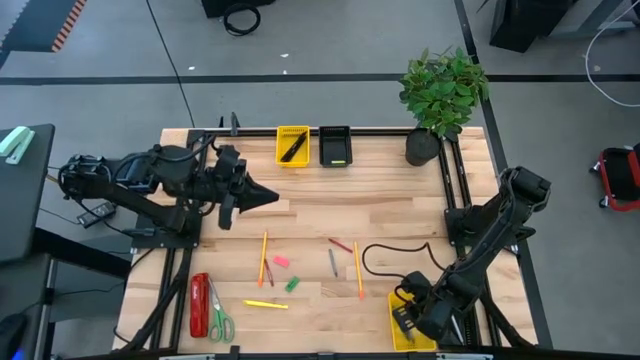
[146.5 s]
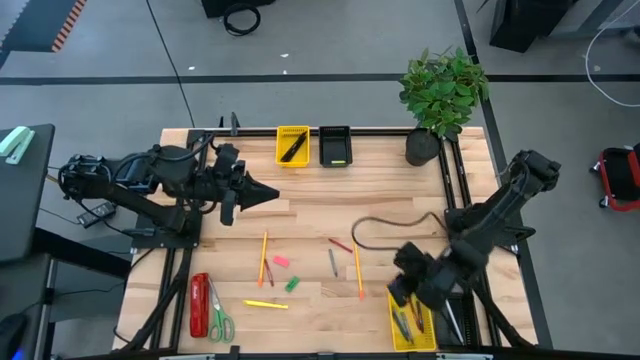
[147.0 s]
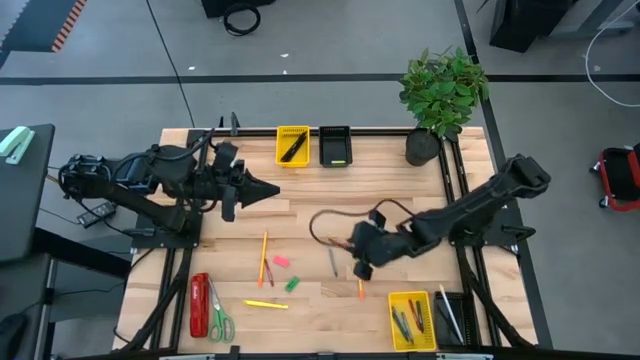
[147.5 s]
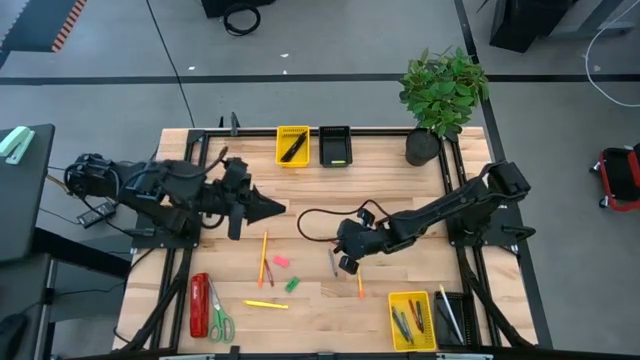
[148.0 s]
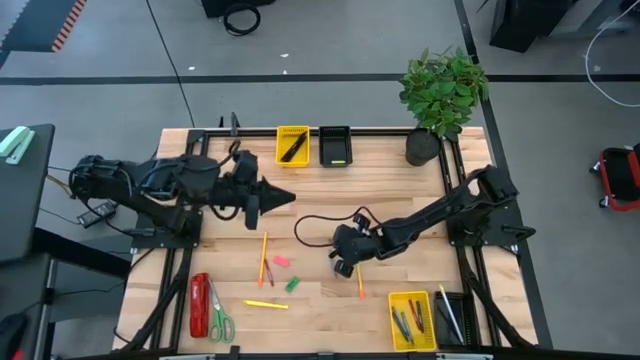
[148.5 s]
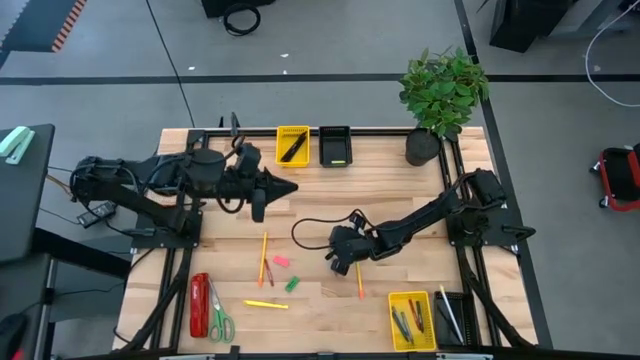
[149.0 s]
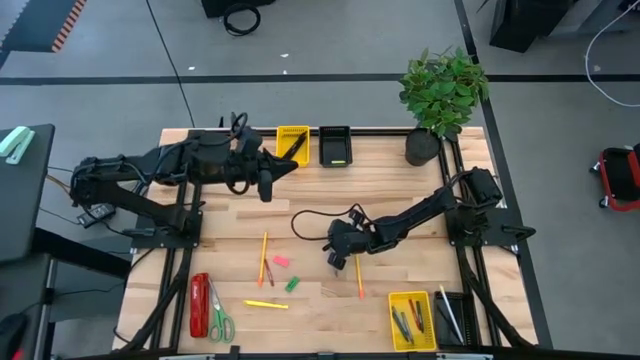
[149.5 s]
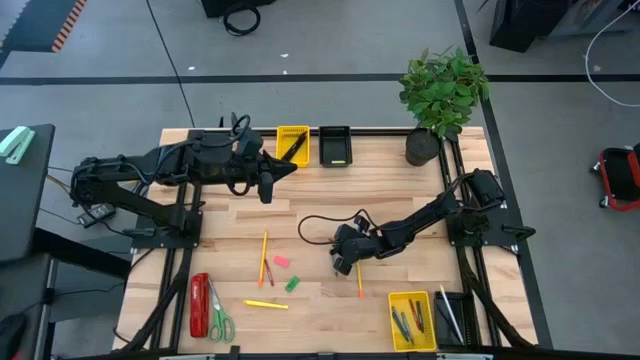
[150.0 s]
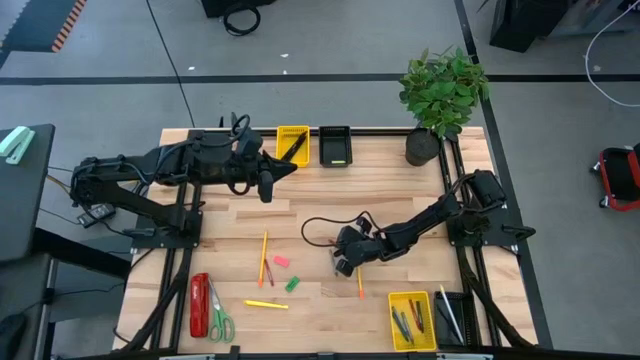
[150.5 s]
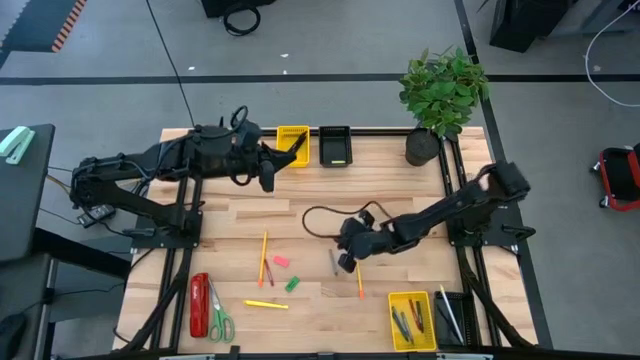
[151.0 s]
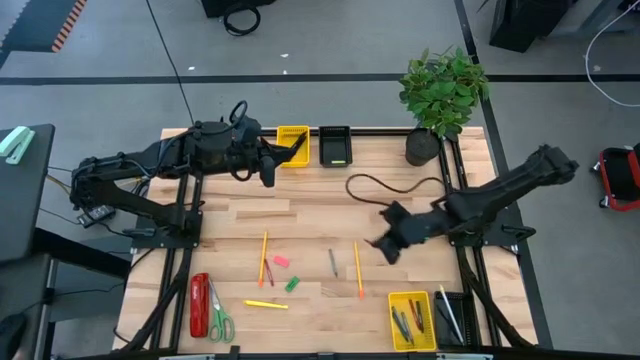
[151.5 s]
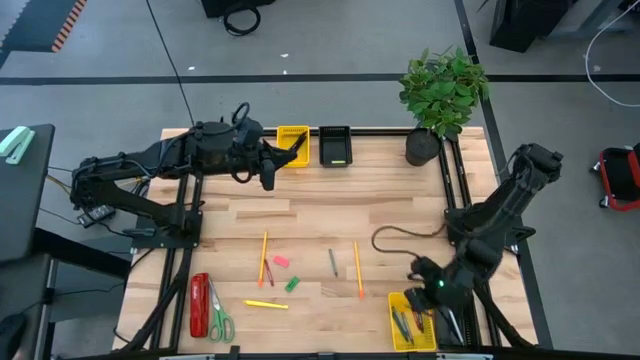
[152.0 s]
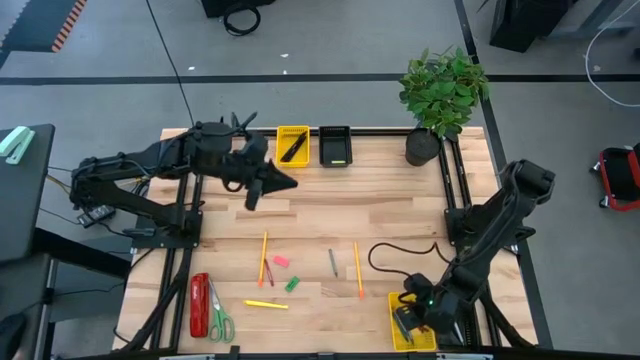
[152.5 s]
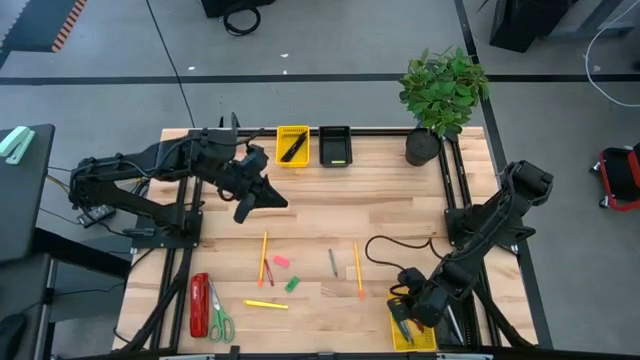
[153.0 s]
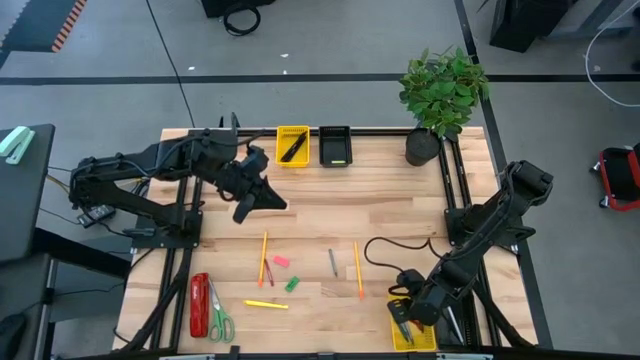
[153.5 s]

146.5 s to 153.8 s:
Task: Sort crayons/erasers/pens/pencils in bins
Put the right red crayon into the bottom yellow bin

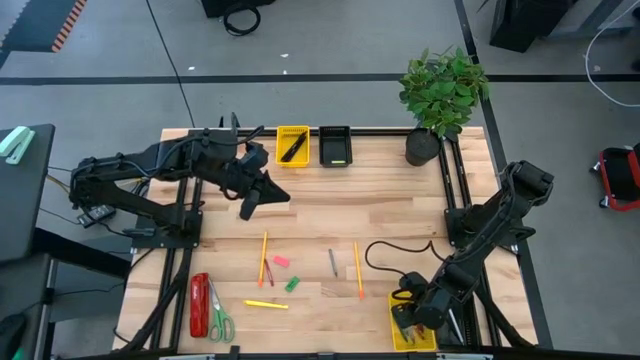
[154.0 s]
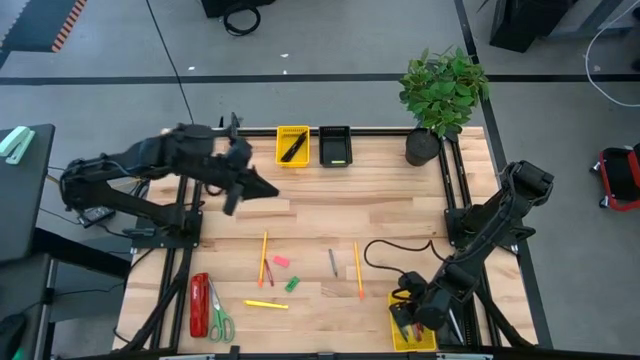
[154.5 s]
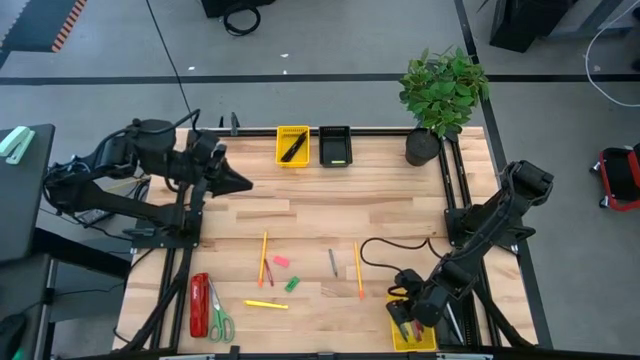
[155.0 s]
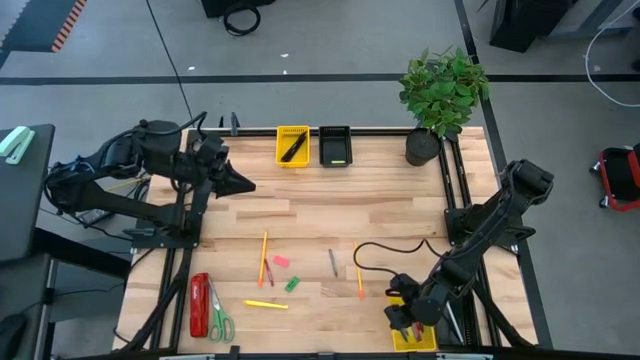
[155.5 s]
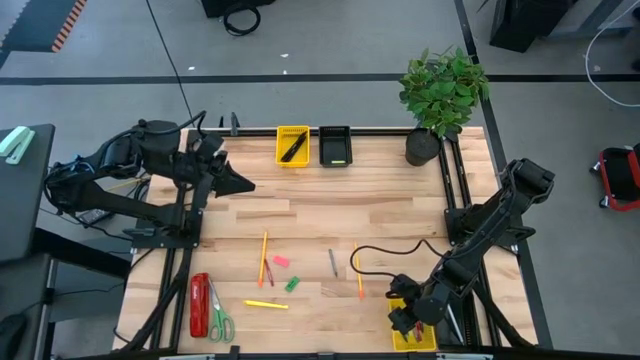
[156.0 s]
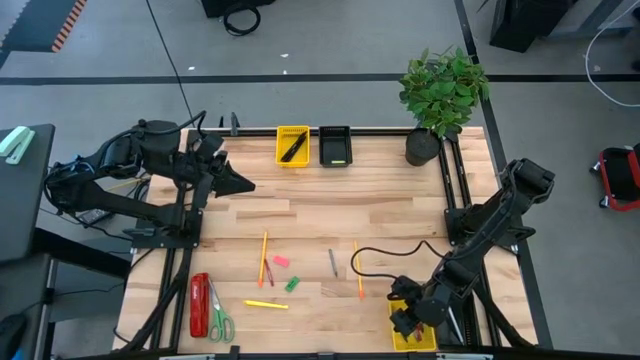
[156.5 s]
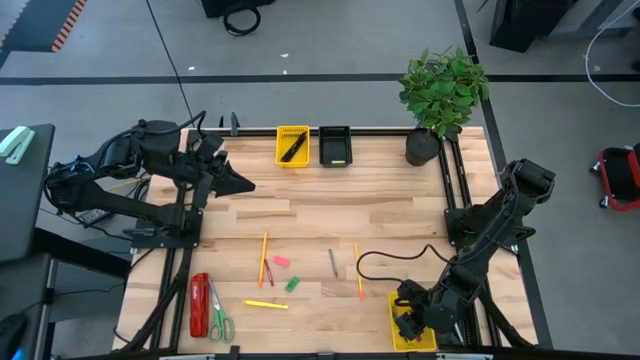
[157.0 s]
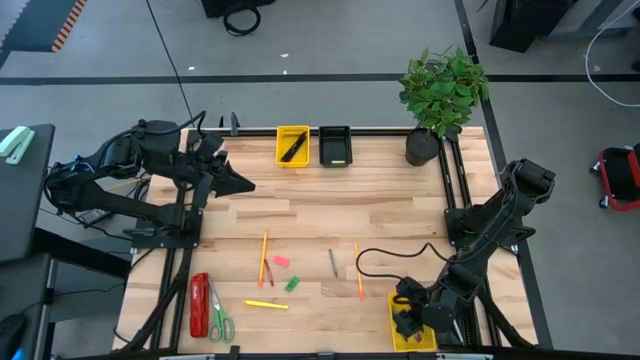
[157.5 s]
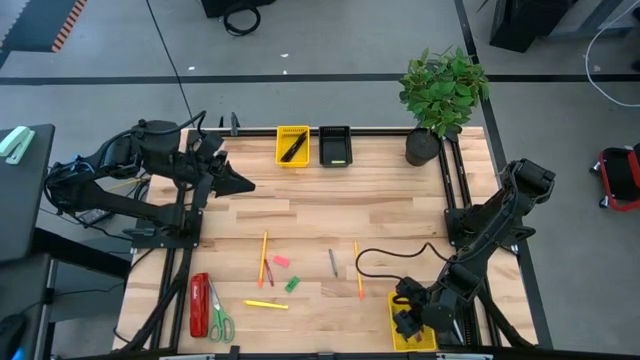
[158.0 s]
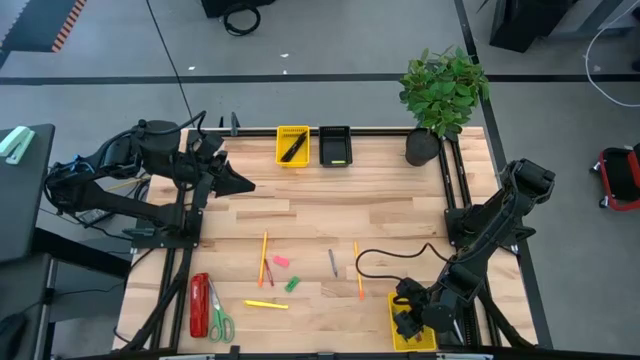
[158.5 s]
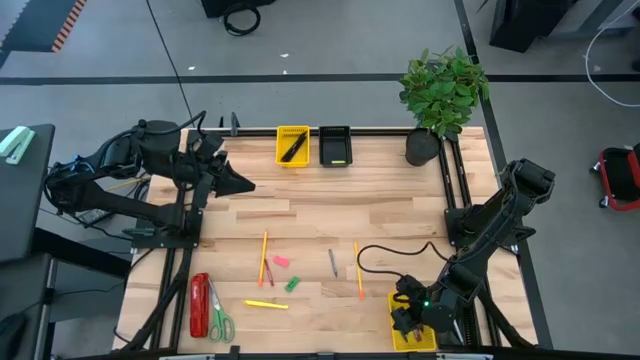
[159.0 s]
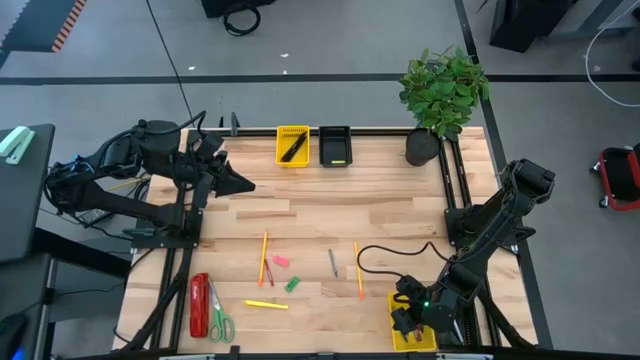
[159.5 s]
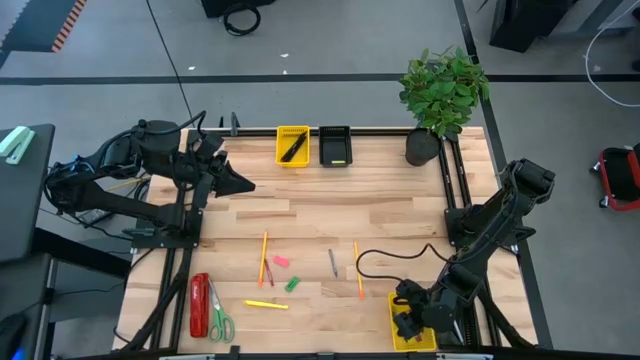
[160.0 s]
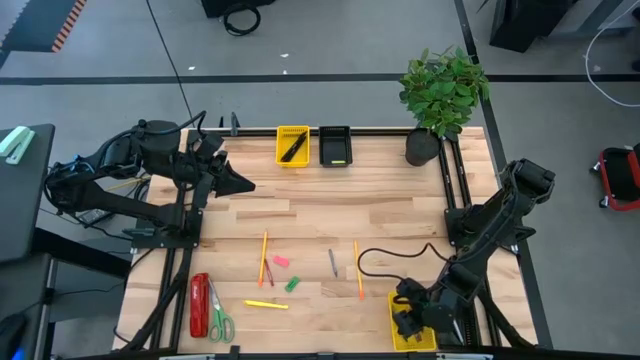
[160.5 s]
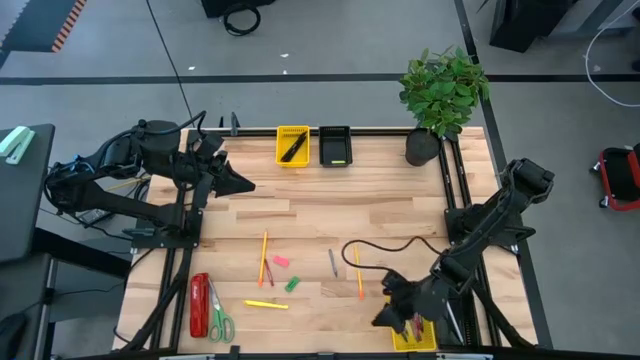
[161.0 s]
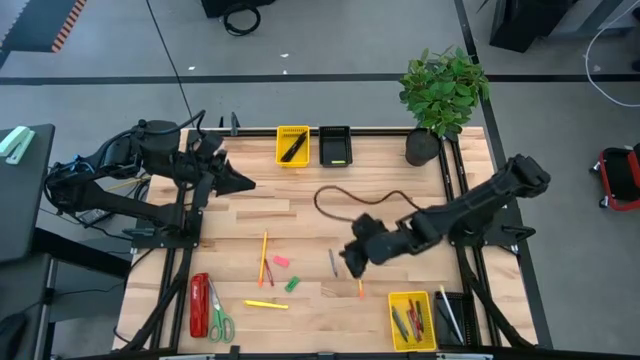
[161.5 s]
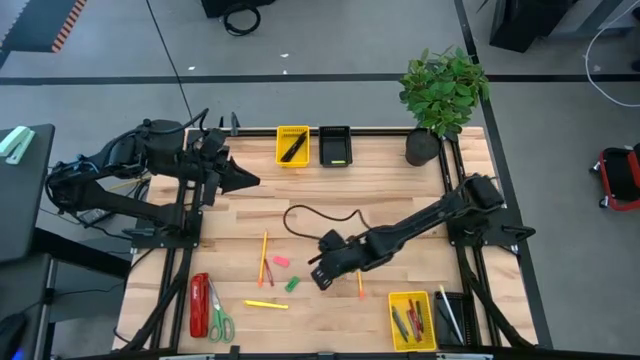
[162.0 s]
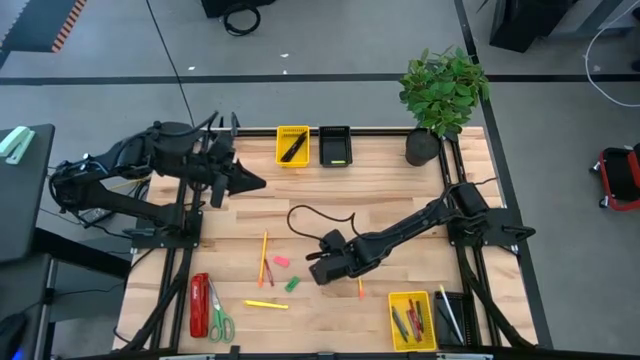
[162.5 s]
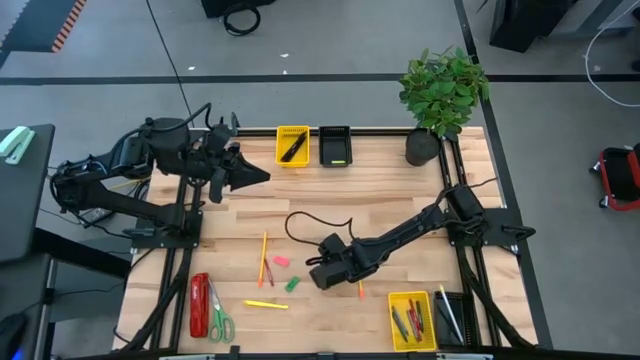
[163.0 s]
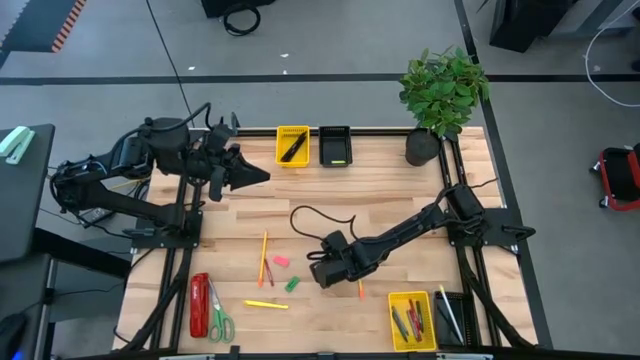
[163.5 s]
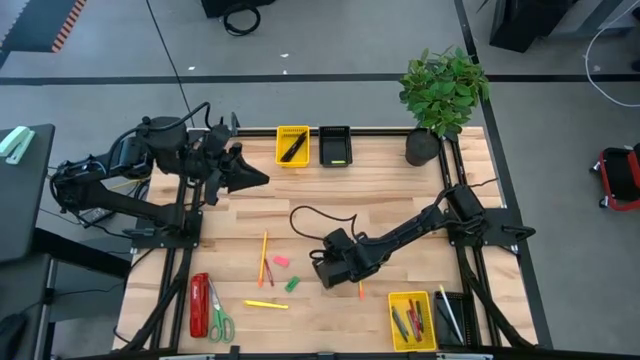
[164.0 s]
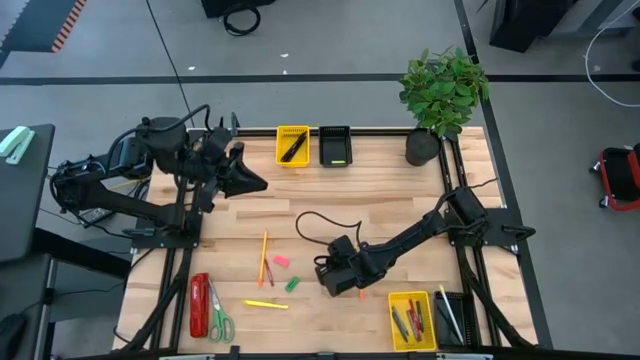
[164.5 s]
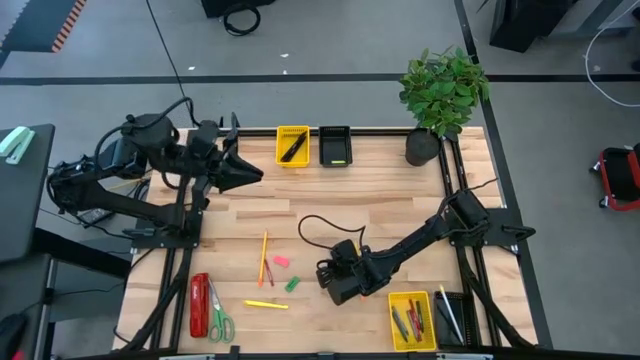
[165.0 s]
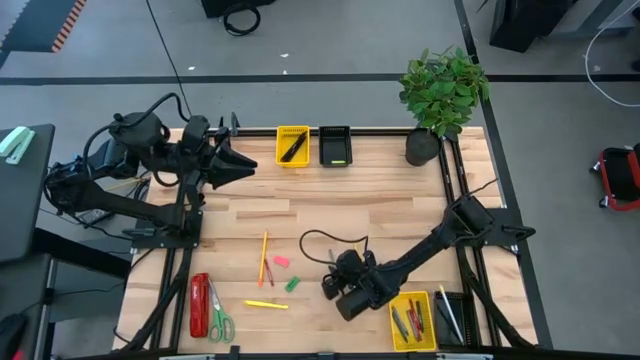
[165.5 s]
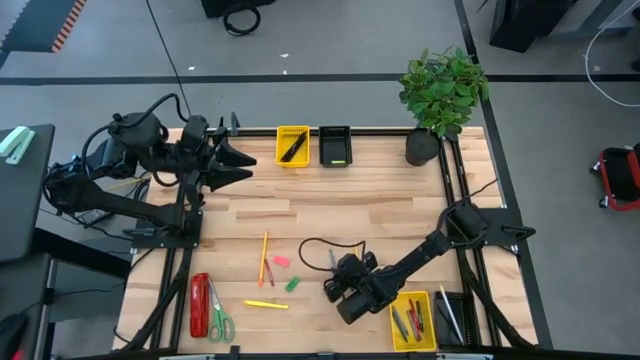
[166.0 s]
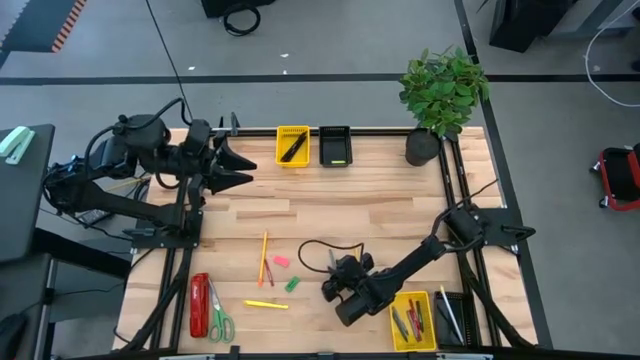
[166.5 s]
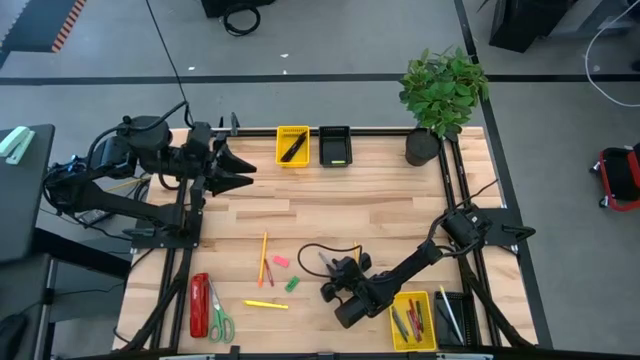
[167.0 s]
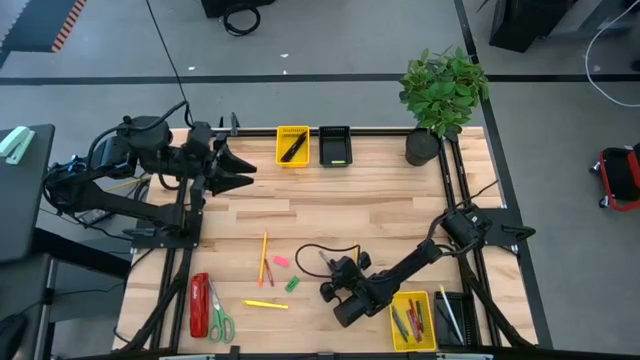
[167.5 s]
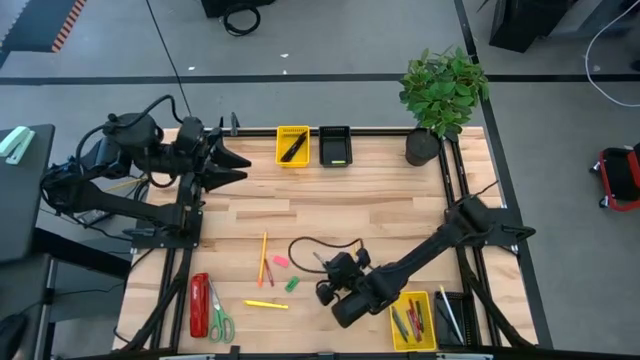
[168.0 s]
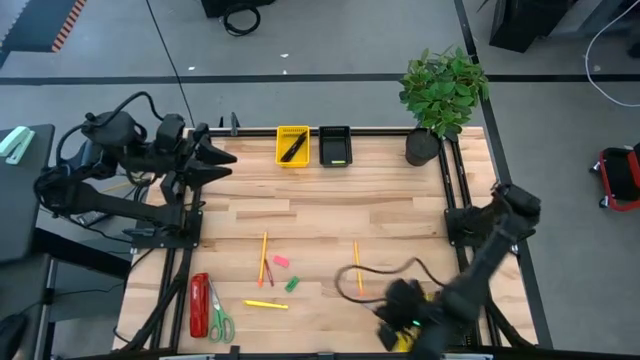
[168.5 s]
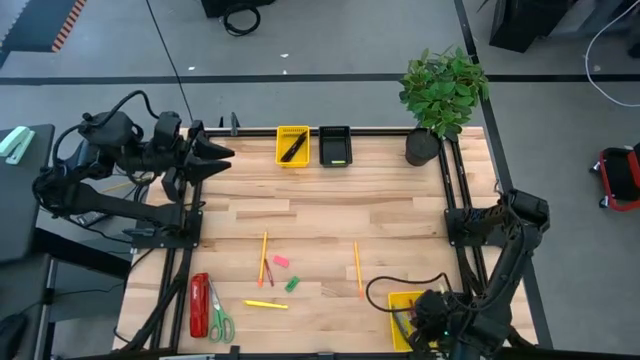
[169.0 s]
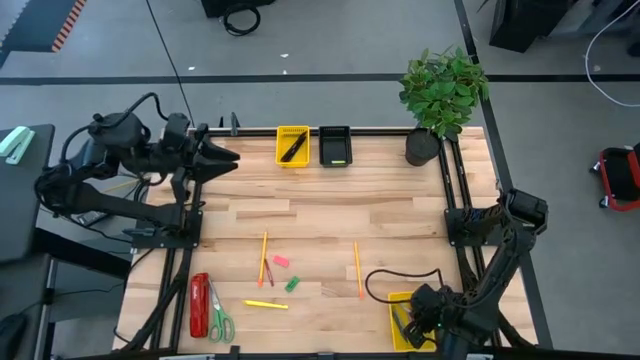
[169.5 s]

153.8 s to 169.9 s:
Put the gray crayon into the bottom yellow bin
